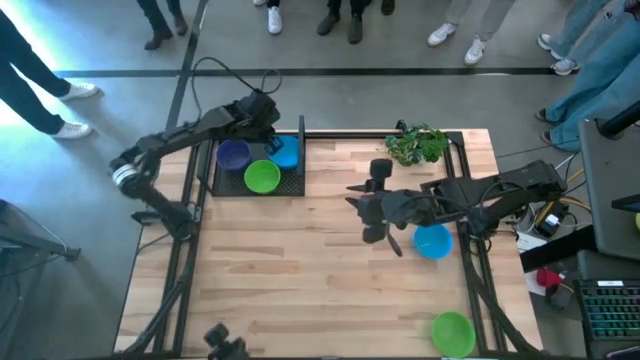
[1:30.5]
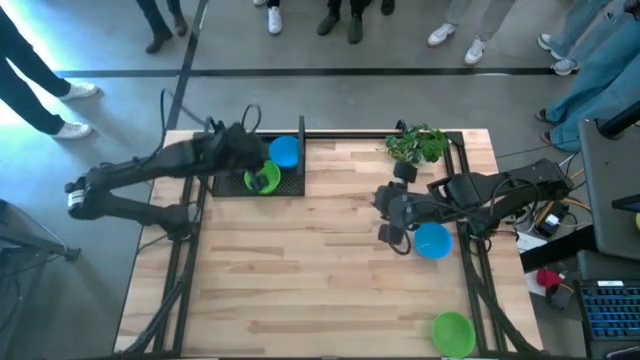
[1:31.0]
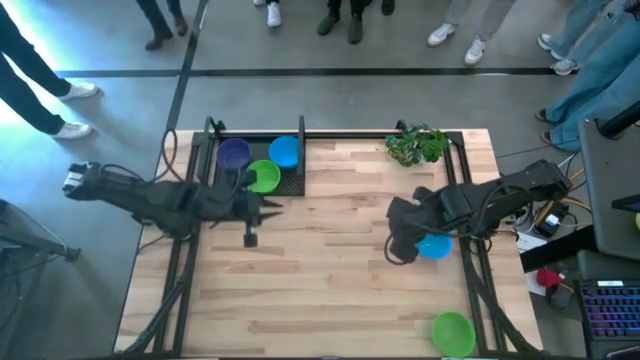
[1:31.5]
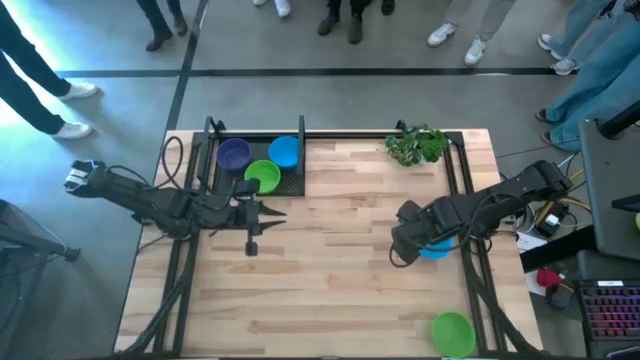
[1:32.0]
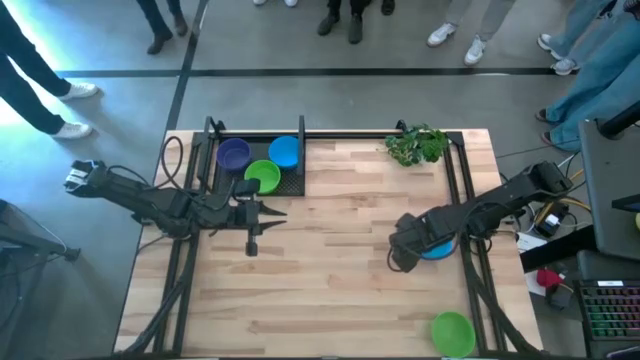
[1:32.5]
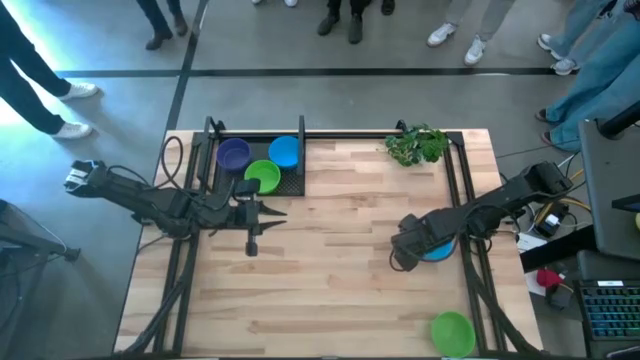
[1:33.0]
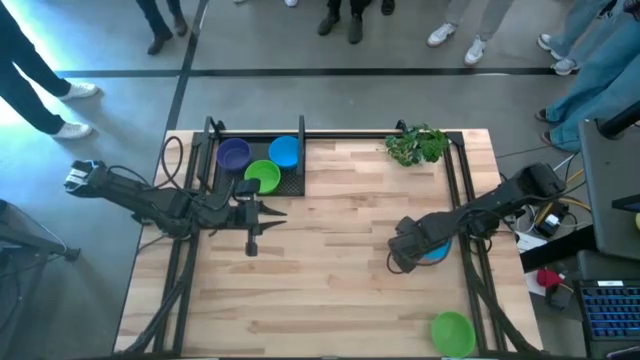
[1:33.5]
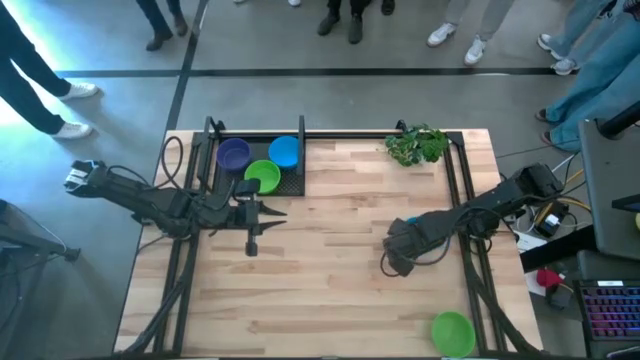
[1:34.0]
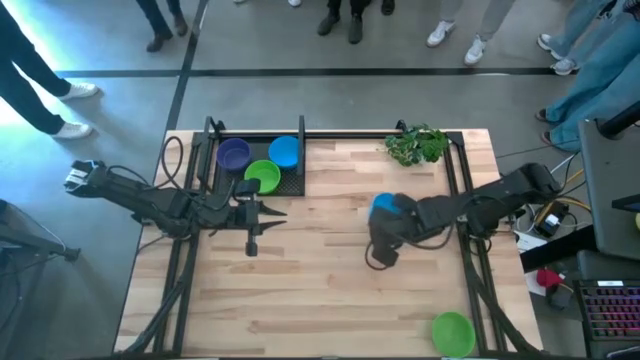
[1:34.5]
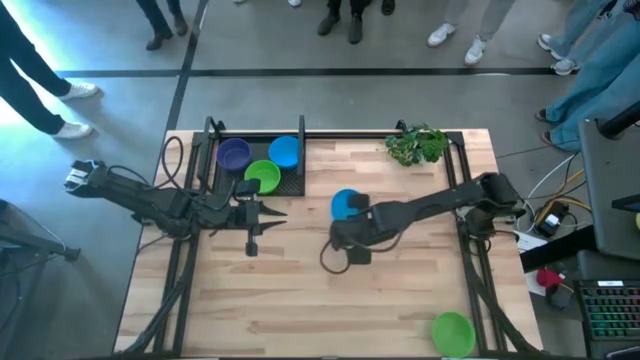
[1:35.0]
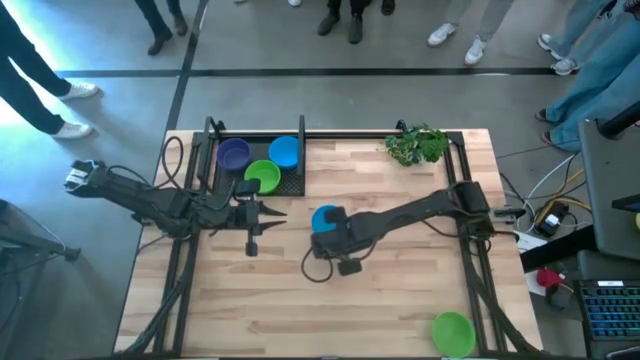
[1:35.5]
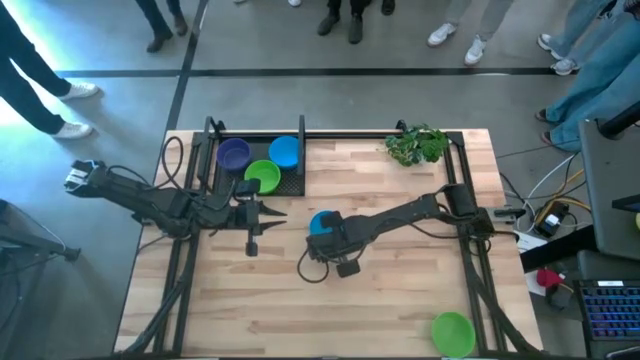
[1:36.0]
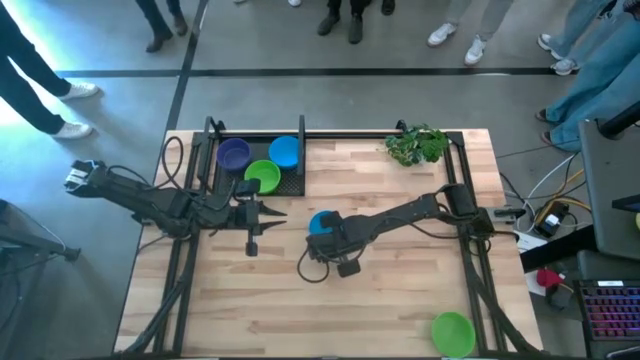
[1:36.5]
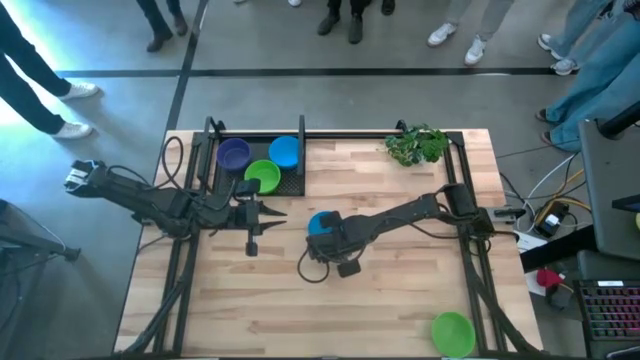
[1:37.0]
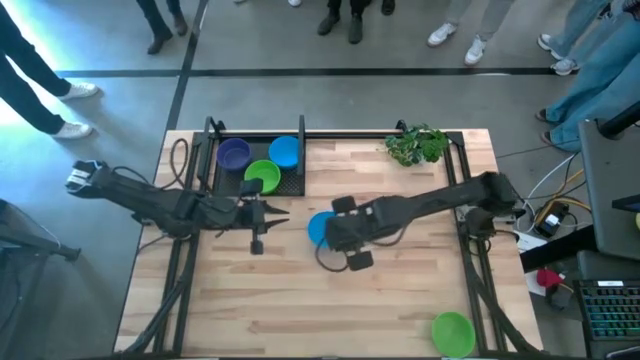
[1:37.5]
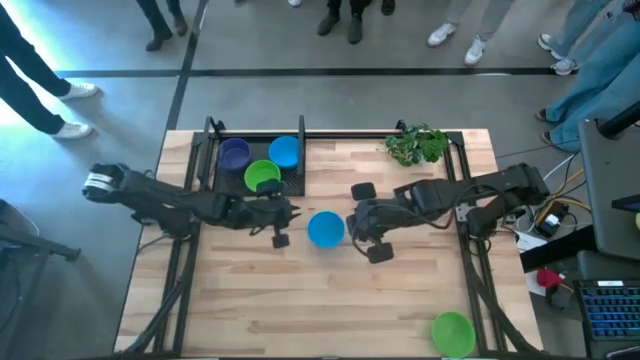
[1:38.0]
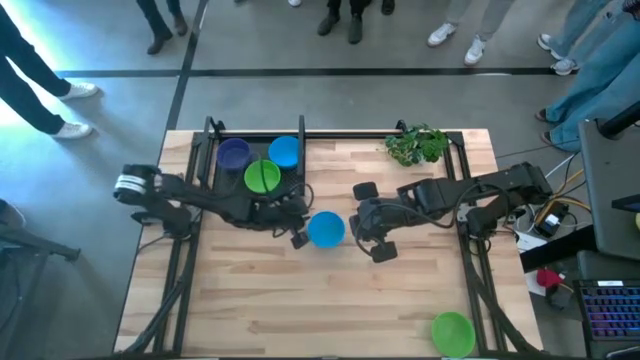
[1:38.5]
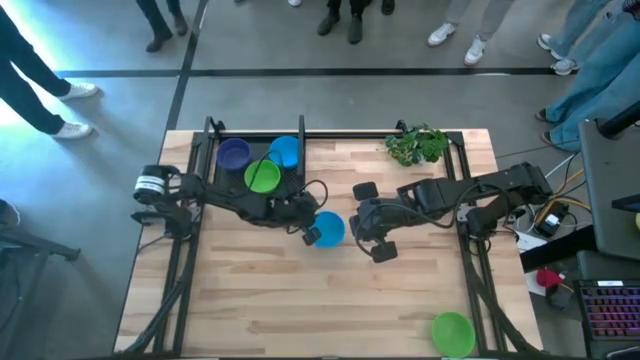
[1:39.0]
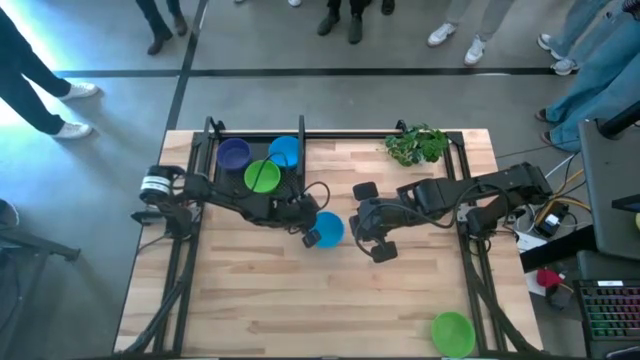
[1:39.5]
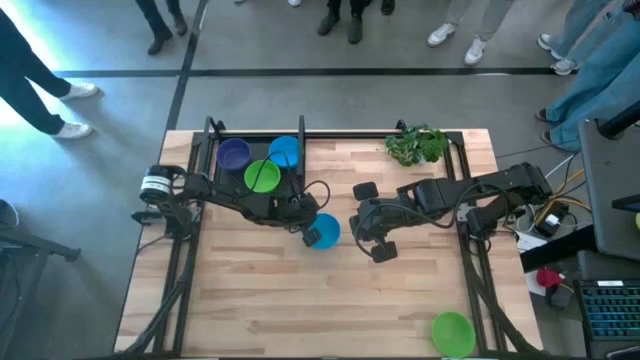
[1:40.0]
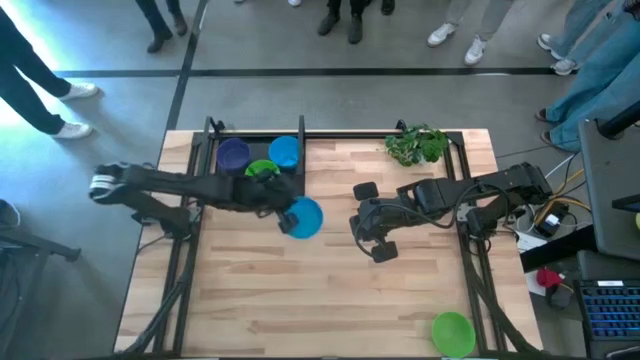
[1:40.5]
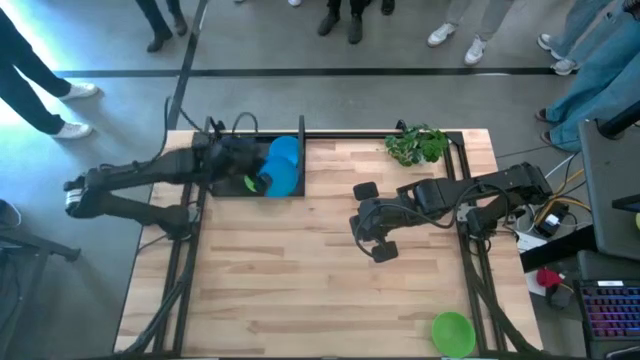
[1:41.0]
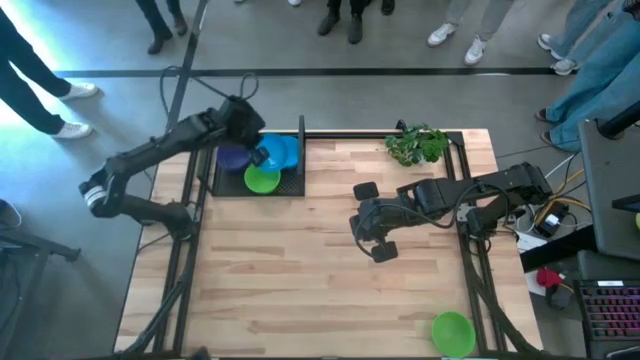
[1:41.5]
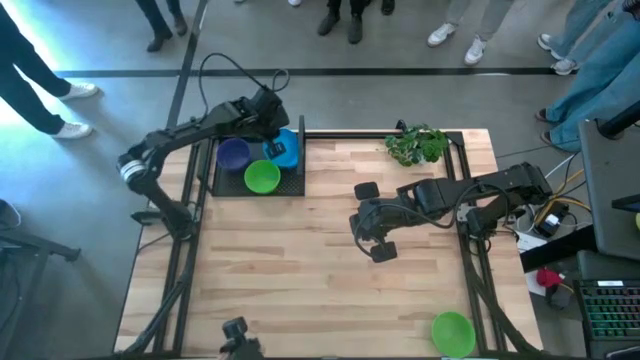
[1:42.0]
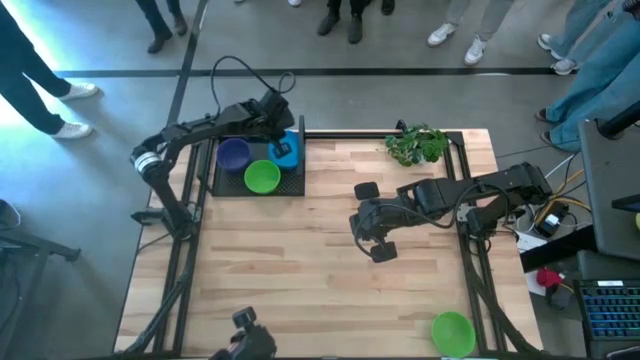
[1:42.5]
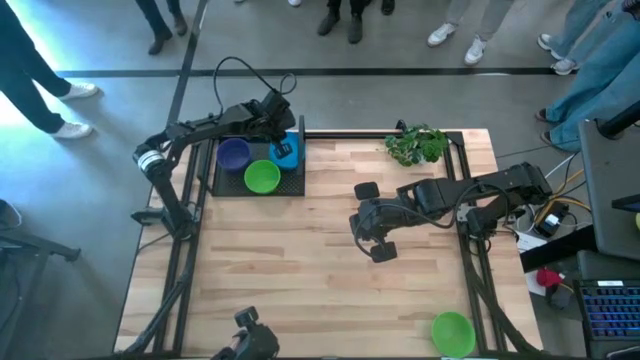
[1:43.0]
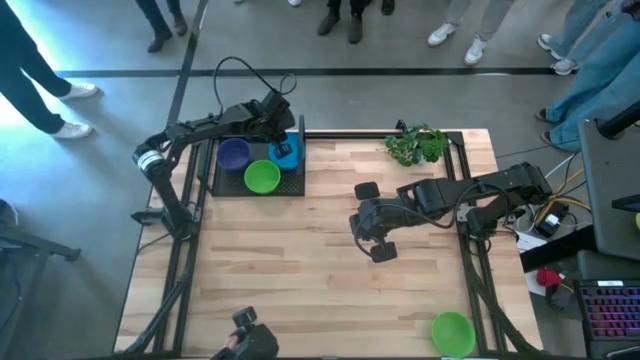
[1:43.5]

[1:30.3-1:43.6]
Task: Pick & Place Mini bowls
Stack the blue bowl on the blue bowl on the shelf
